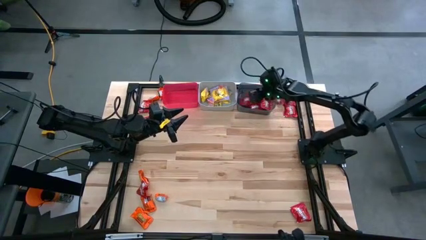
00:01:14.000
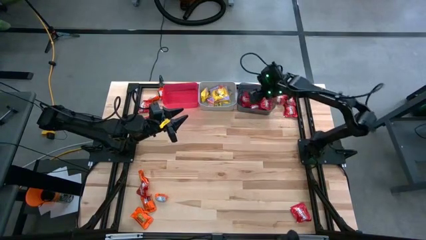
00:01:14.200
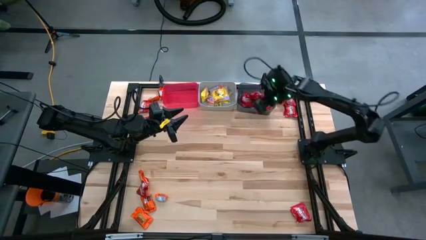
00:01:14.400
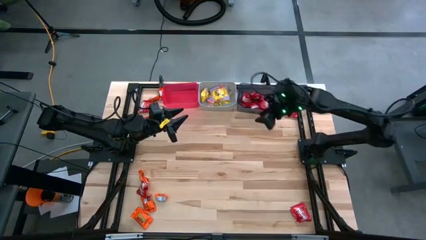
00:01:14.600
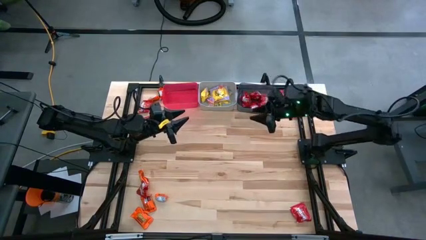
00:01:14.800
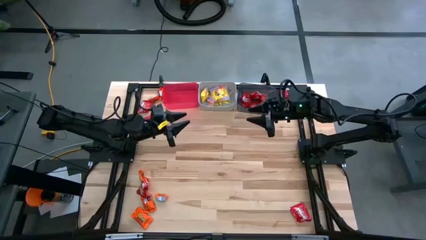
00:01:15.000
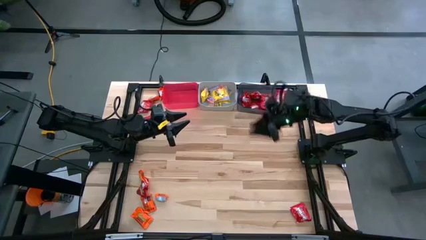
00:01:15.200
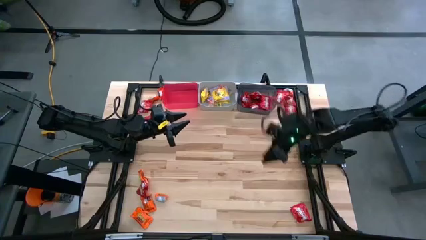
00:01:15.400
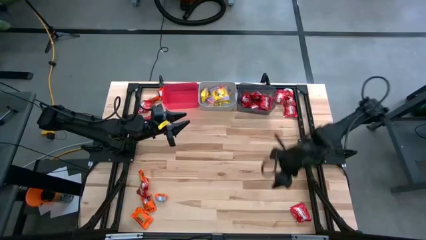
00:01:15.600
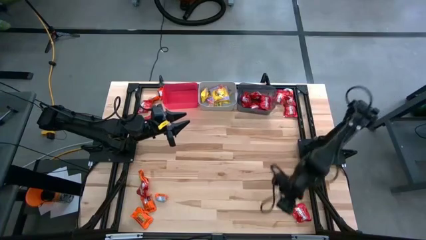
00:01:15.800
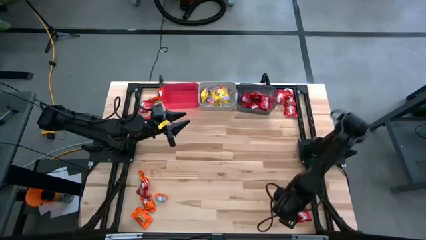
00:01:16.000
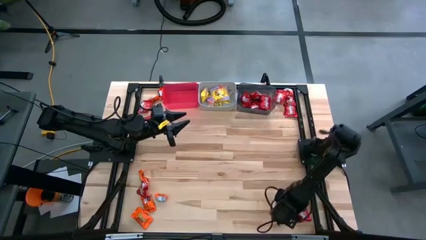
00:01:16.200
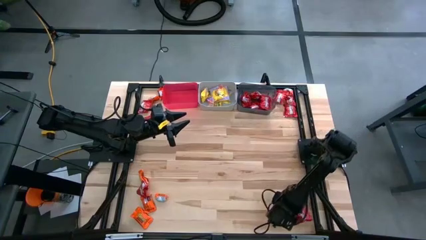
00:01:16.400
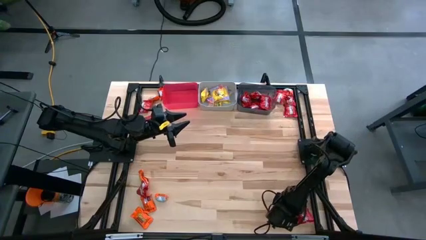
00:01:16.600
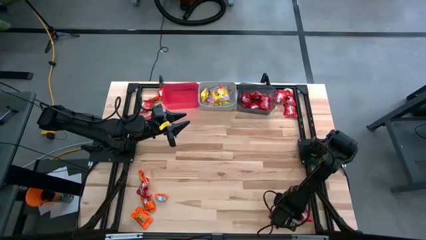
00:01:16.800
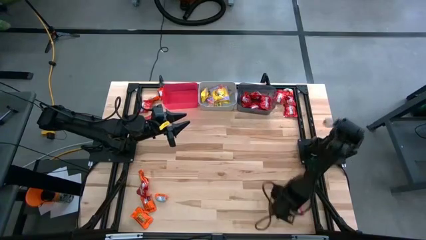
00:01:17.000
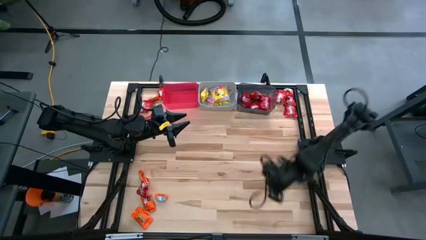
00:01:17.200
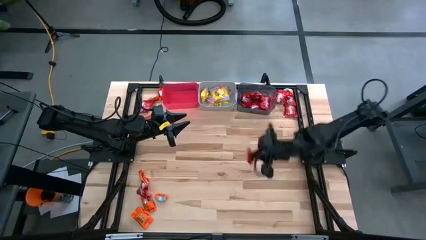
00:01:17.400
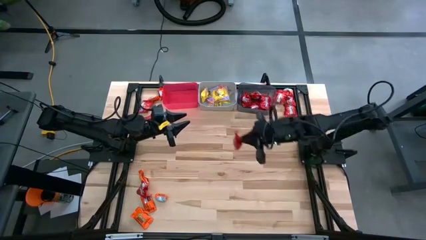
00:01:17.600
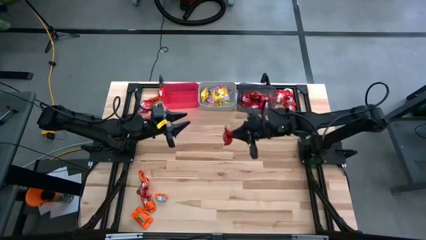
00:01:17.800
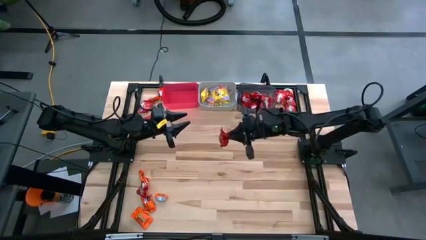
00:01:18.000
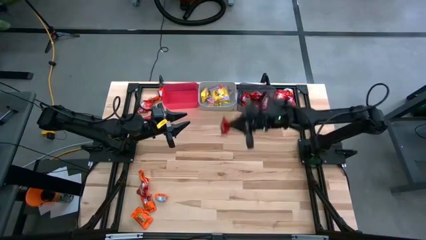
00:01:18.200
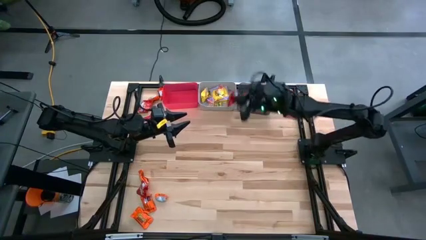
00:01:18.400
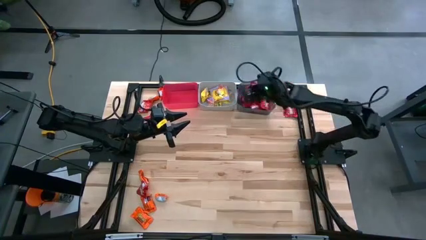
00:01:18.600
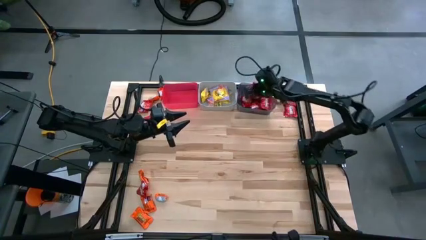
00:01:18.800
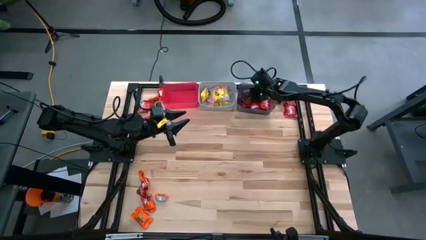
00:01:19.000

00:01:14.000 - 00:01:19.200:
Task: Sort candy
Put the red candy into the black bin

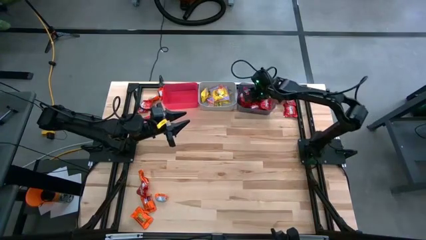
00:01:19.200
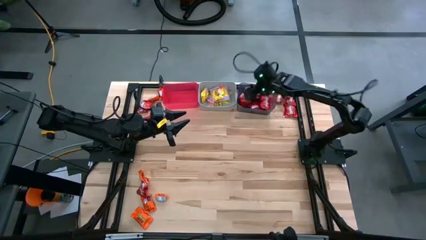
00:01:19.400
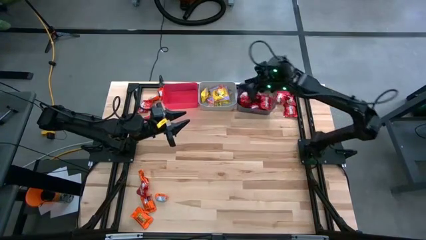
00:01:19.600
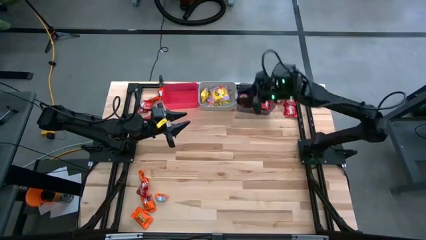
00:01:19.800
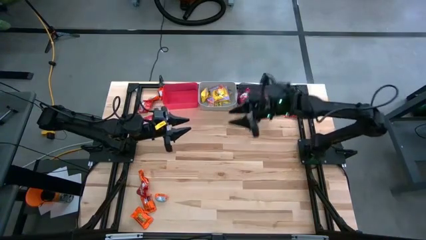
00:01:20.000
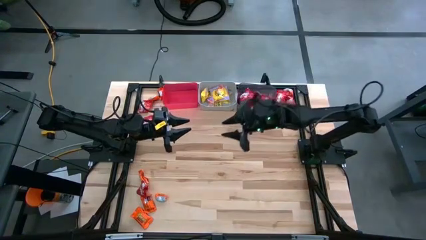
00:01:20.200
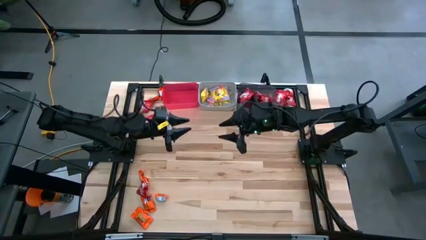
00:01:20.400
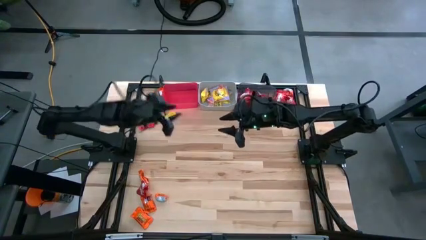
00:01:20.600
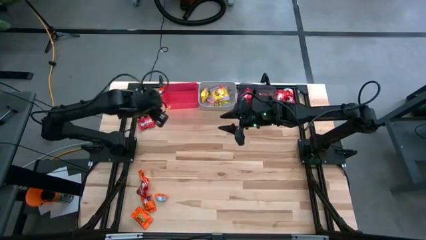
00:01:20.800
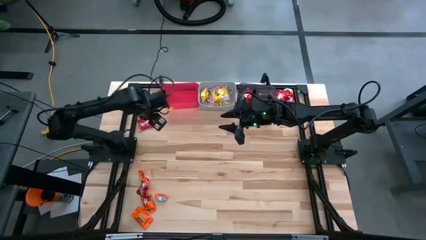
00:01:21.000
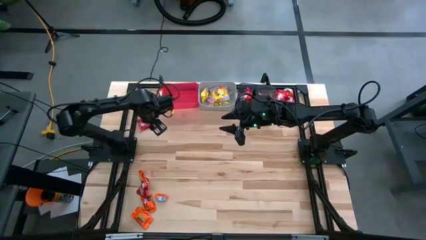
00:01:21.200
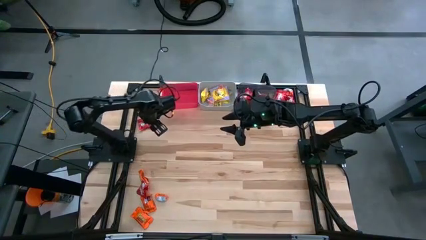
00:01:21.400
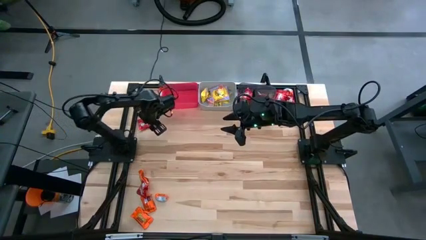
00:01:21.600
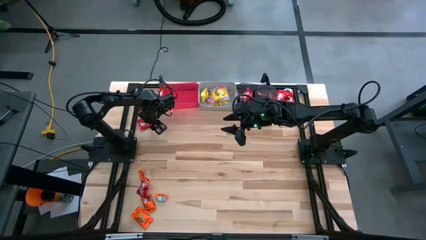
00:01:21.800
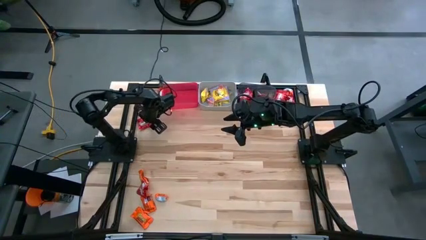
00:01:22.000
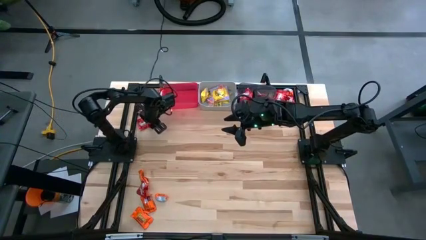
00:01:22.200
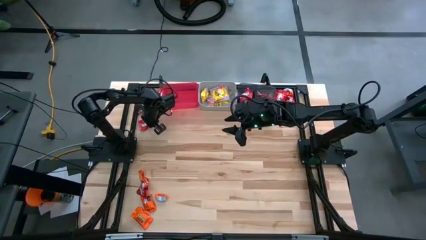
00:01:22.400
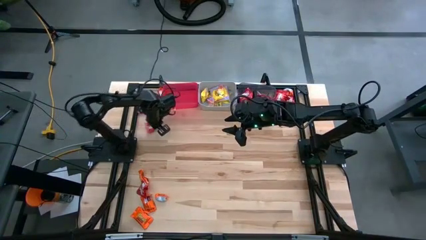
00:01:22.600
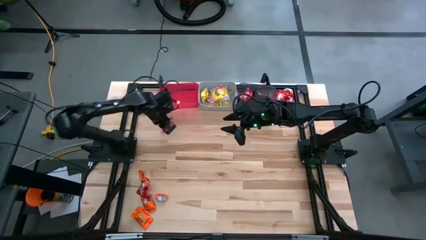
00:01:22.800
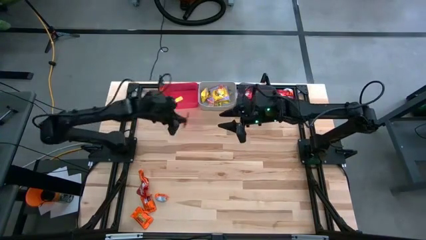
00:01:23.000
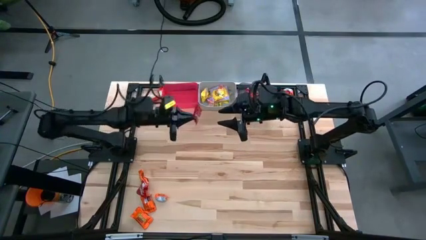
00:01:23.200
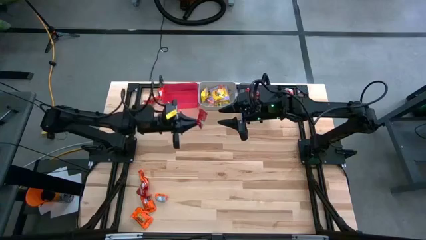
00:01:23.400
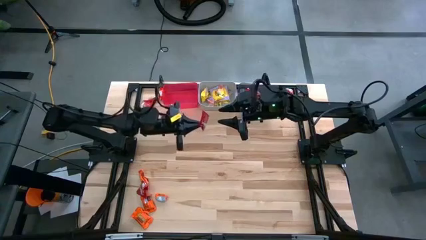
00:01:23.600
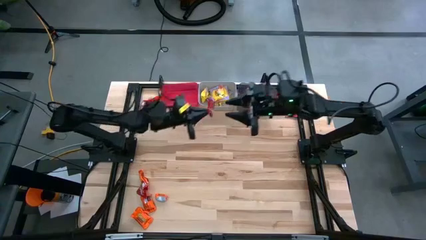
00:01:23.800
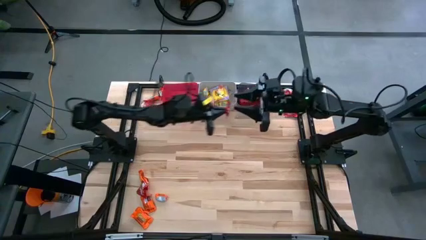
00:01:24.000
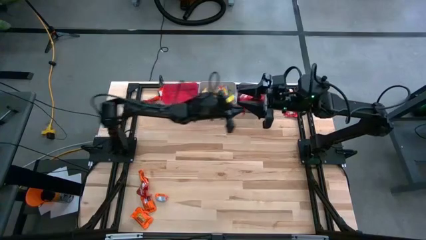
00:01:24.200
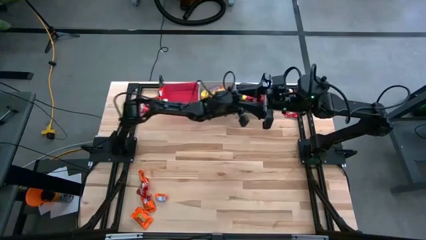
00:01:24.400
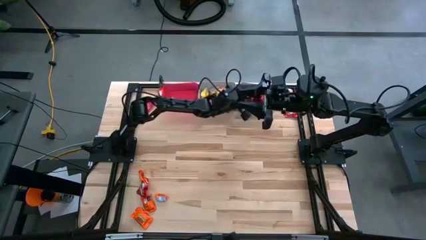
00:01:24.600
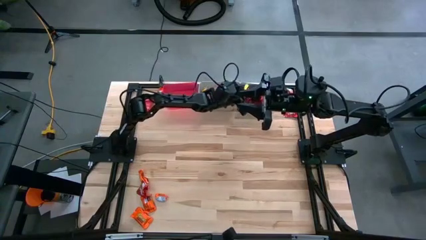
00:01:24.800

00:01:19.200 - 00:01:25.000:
Put the red candy into the black bin

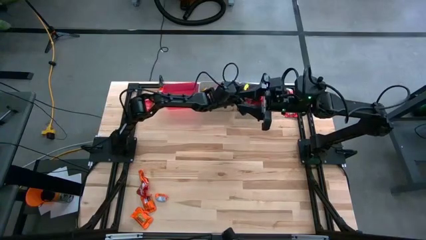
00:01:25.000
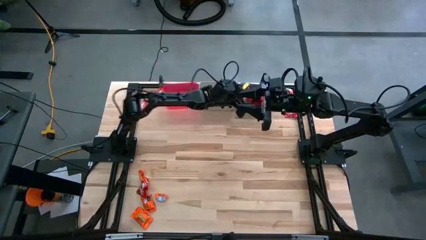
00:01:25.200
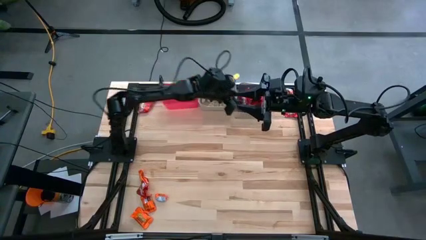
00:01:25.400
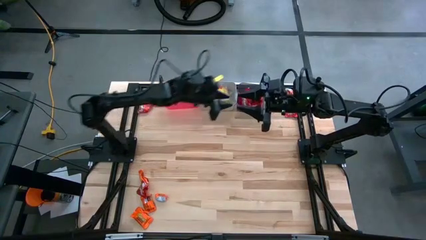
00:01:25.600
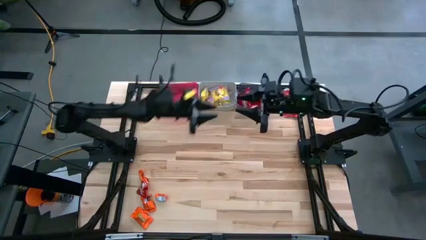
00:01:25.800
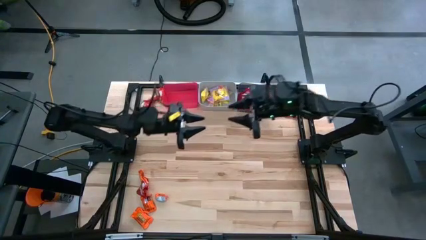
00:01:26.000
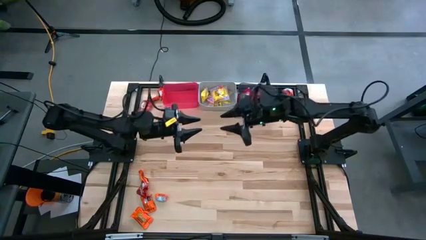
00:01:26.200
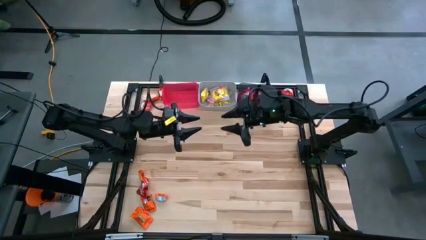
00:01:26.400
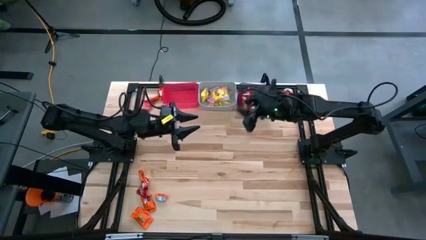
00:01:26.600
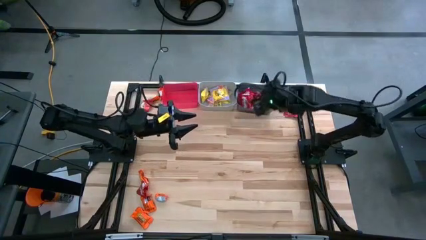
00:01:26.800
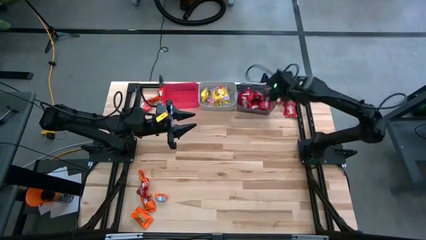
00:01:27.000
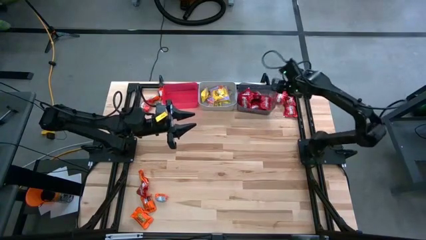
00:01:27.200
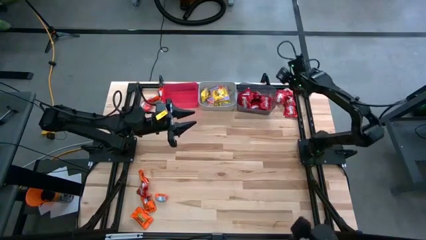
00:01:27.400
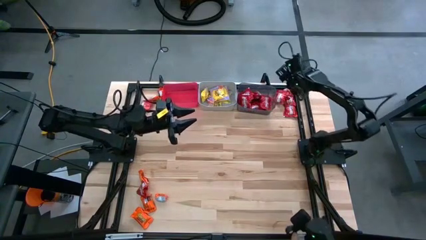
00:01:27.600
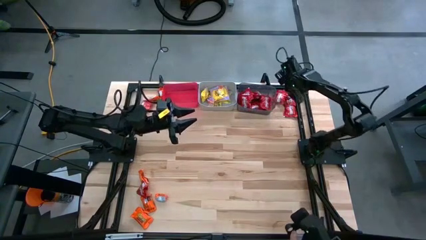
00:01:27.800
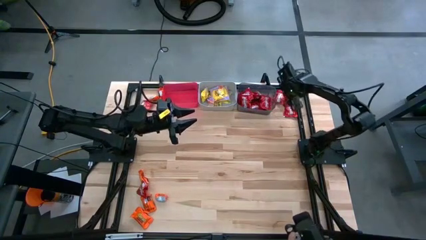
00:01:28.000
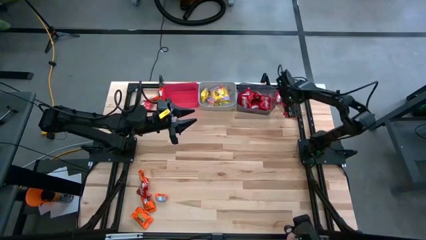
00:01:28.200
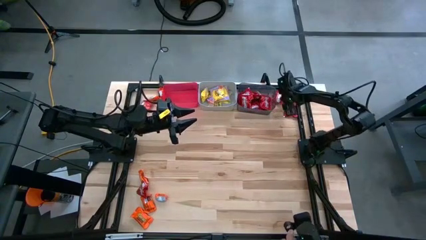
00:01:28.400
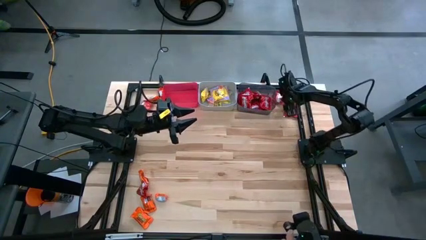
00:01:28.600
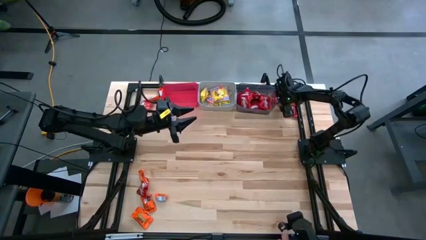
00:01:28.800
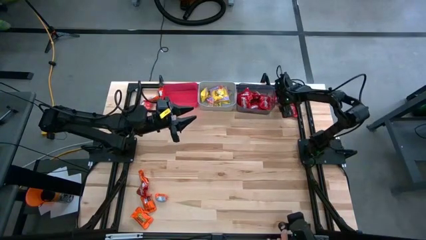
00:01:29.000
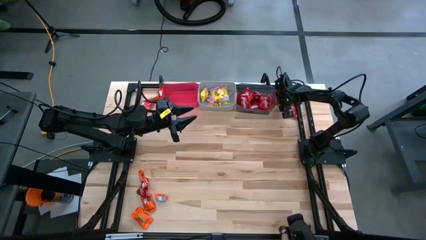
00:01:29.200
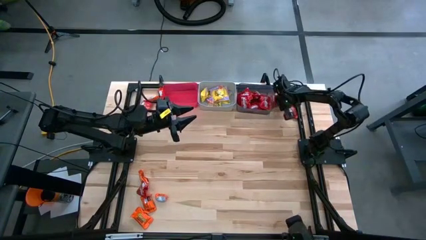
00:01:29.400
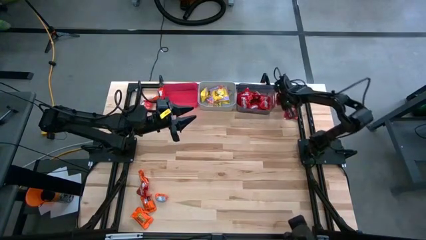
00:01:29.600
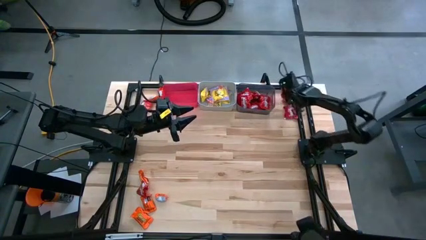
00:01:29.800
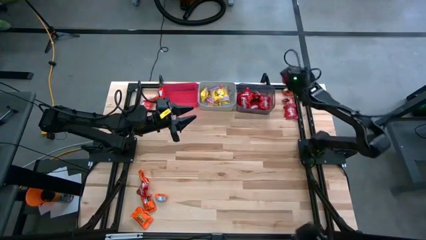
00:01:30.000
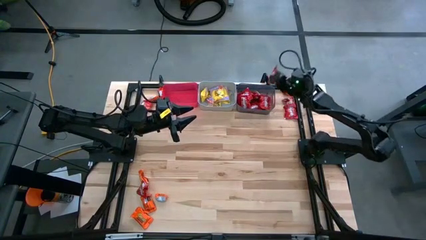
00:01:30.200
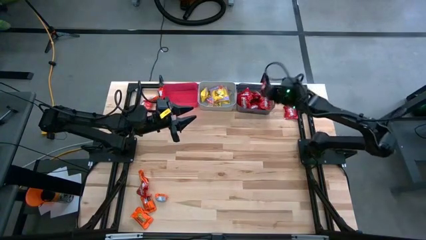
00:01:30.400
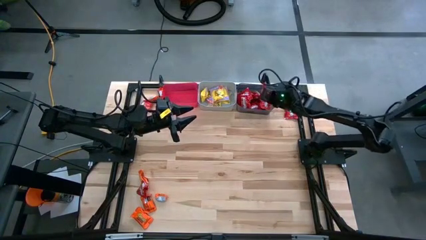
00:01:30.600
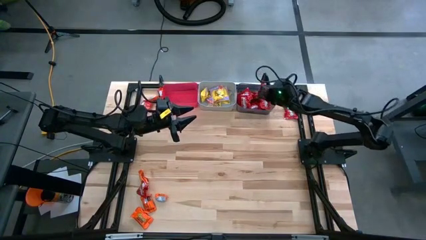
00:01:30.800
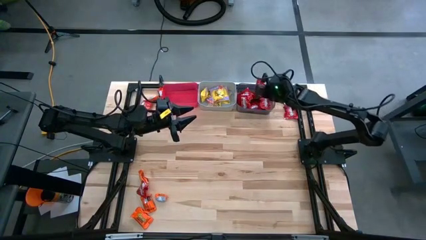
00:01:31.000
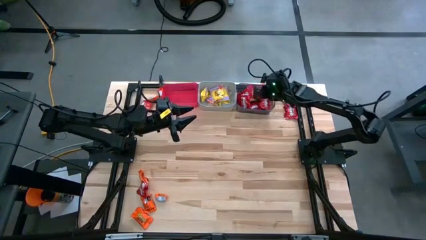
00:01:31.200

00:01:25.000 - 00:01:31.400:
Put the red candy into the black bin
